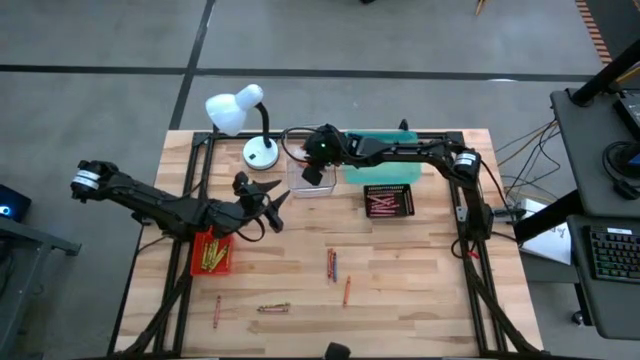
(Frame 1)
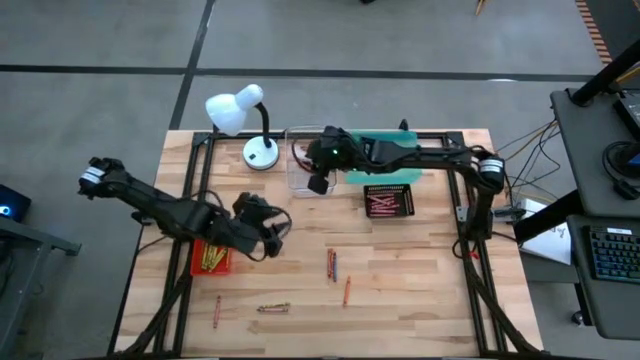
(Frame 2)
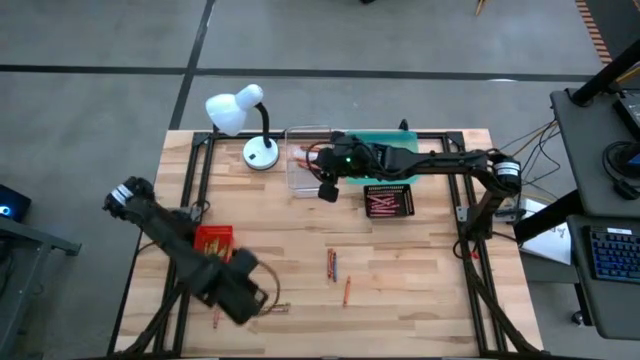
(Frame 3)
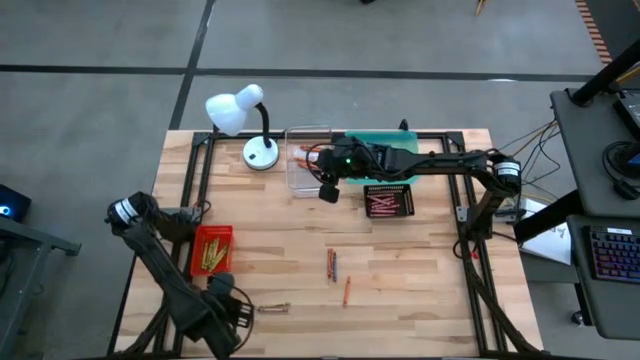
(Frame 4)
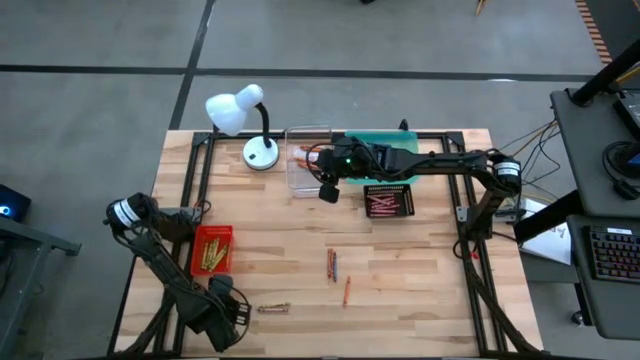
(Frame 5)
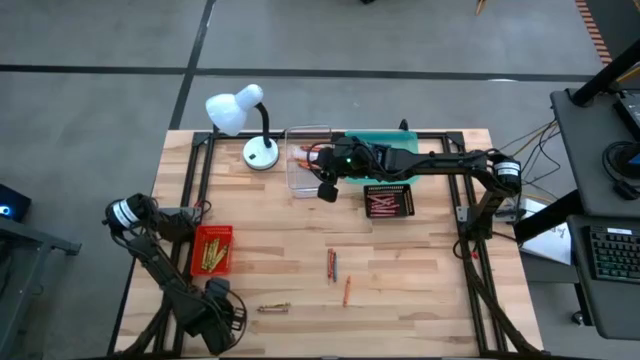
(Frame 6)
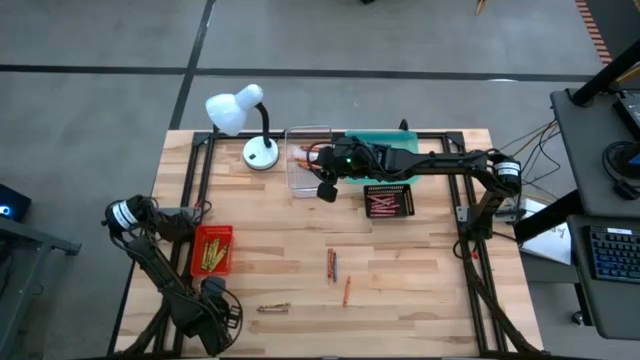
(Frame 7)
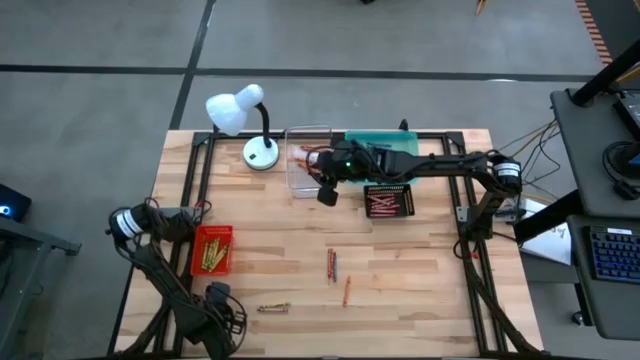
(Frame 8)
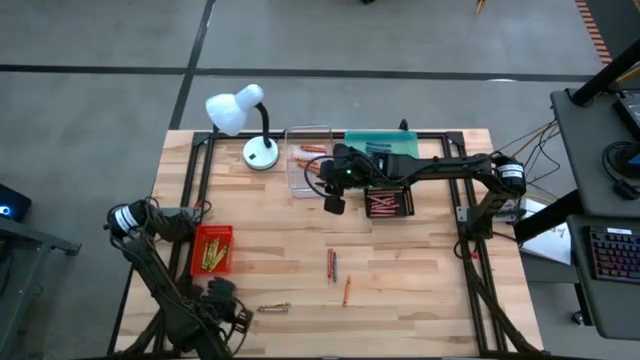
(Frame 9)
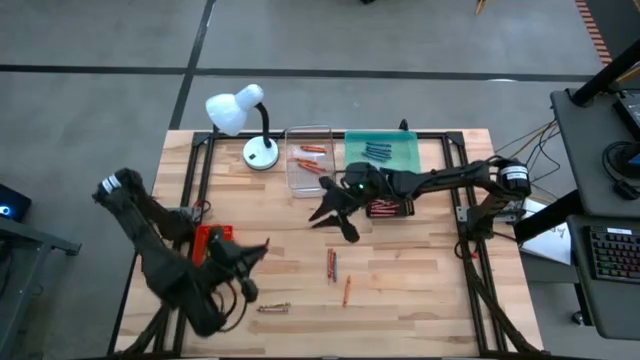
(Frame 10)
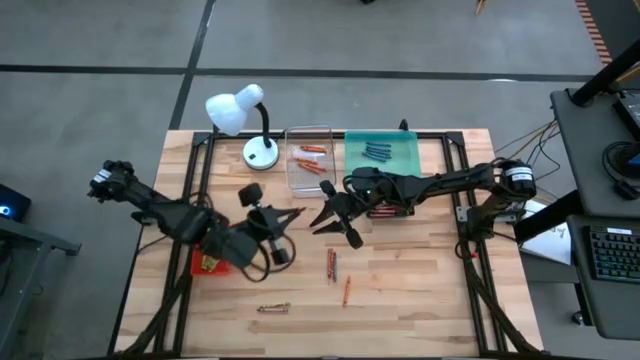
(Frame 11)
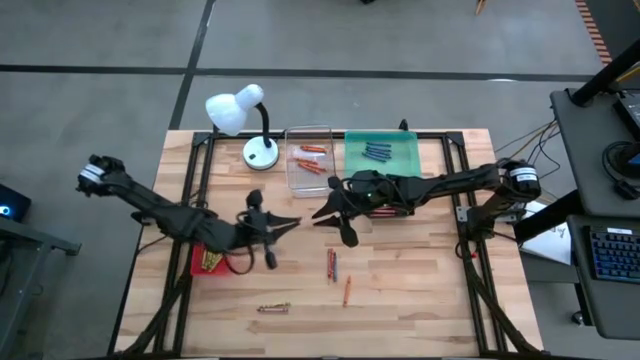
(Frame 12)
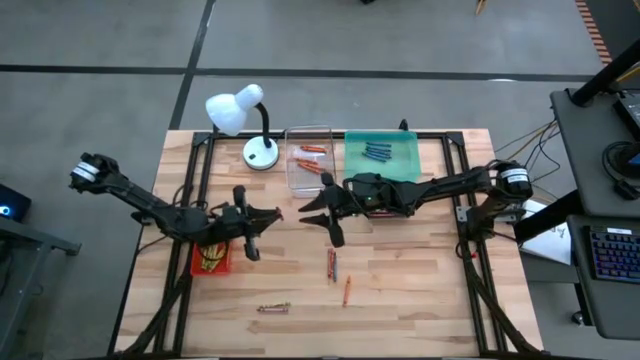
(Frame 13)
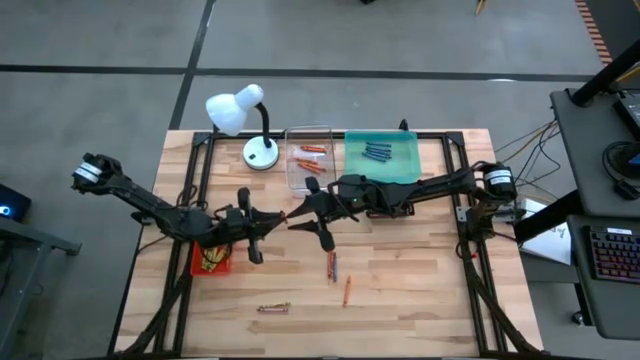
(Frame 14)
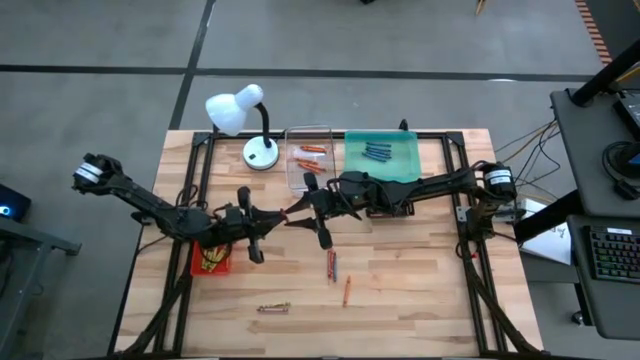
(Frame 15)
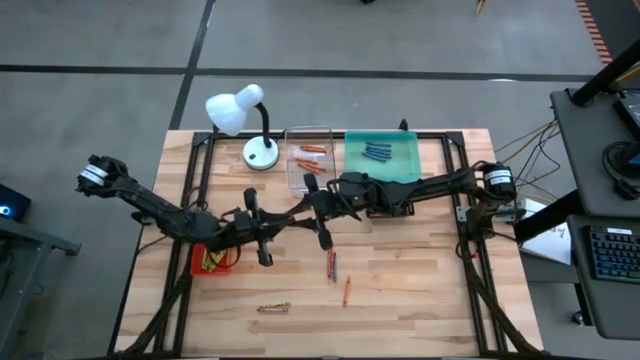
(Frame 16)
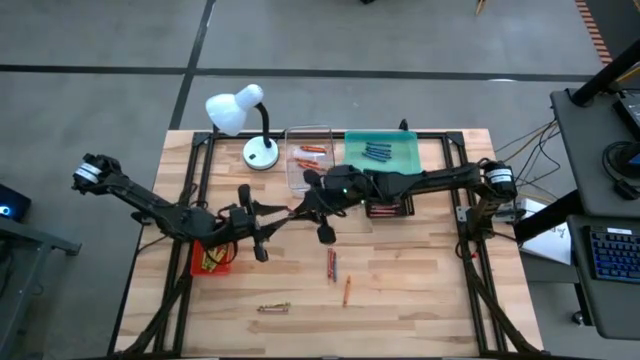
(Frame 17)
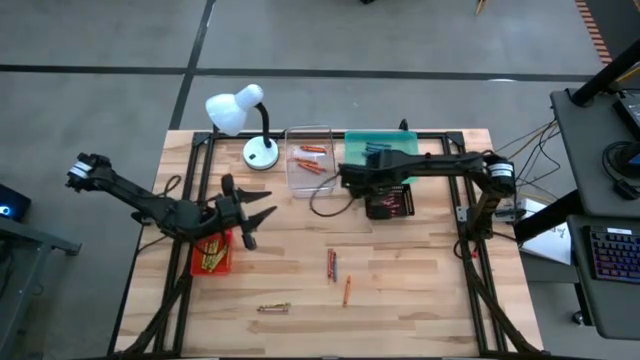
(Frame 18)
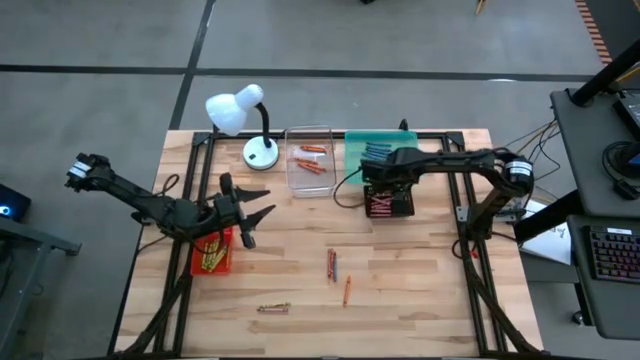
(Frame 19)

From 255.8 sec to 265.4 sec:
Task: Sort crayons
Put the red crayon into the black bin

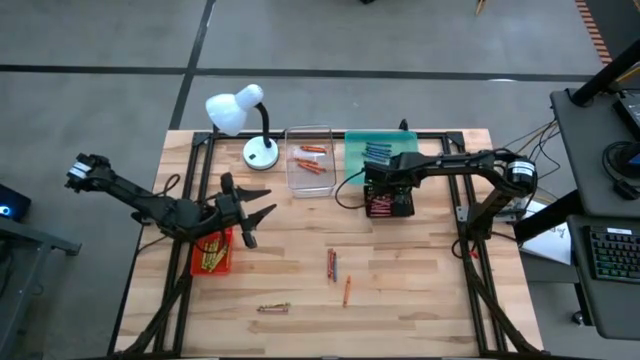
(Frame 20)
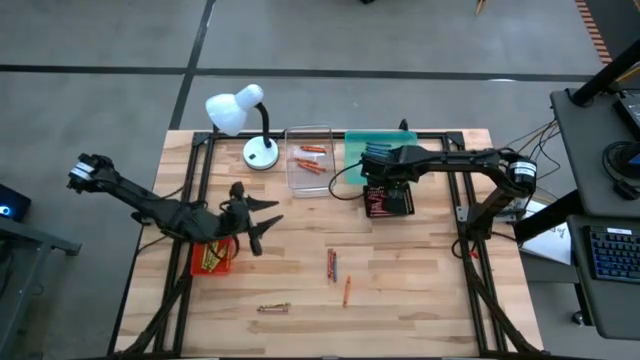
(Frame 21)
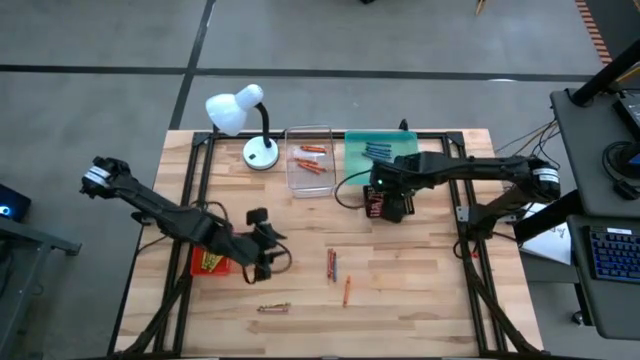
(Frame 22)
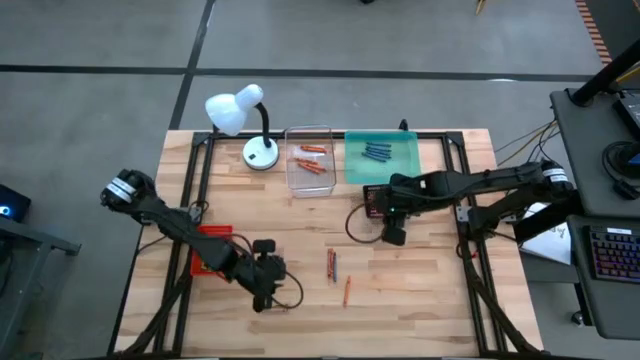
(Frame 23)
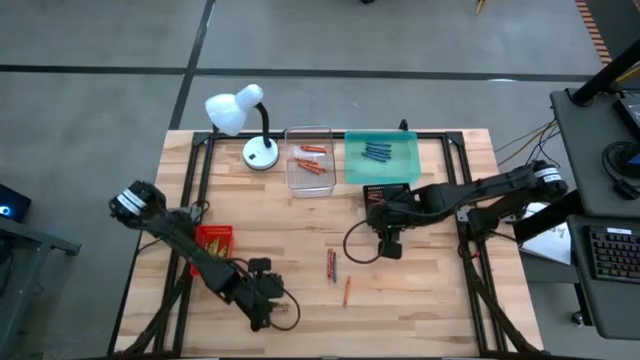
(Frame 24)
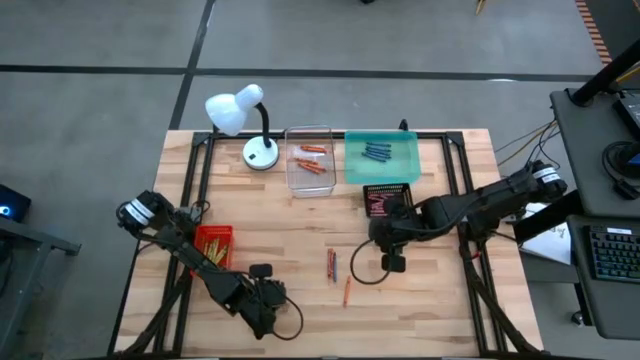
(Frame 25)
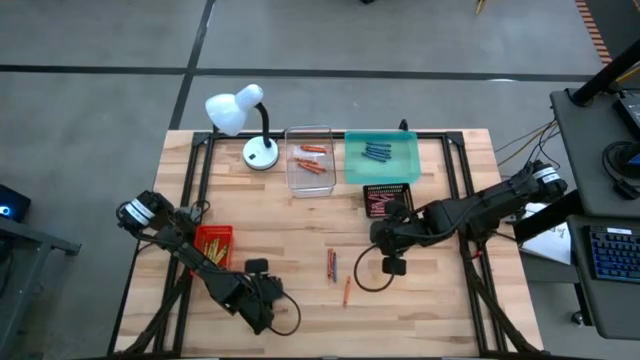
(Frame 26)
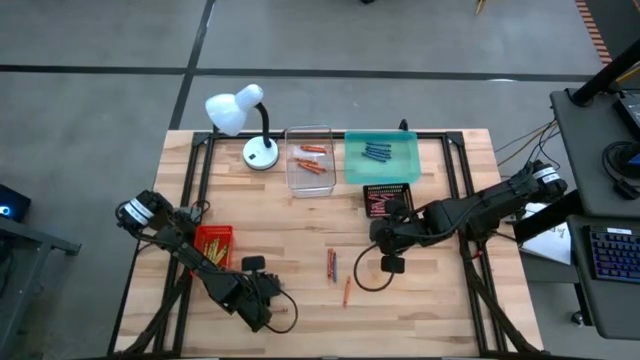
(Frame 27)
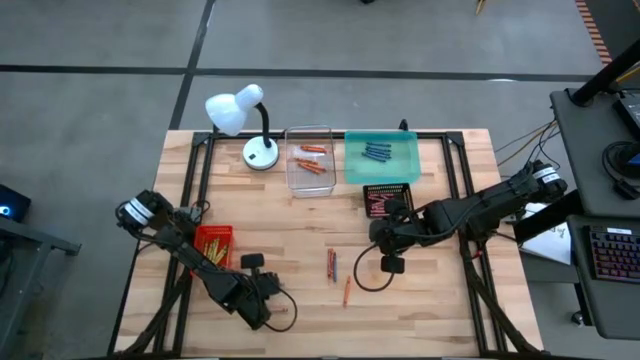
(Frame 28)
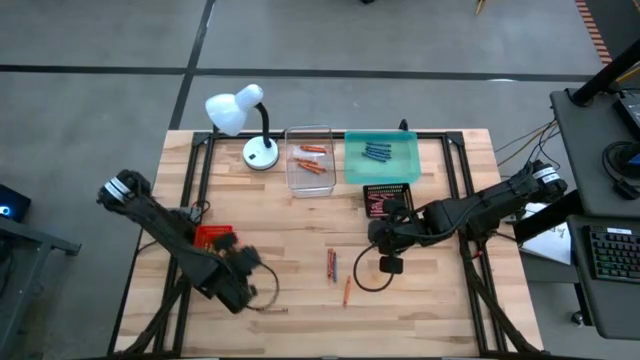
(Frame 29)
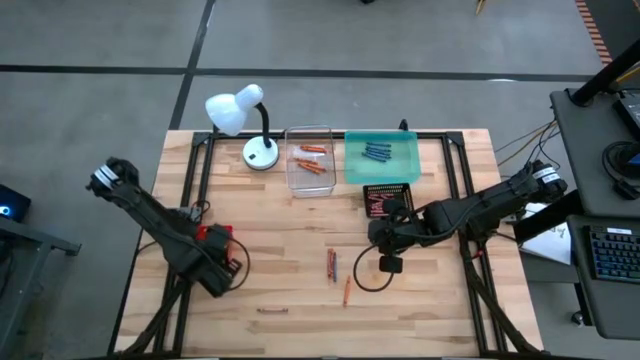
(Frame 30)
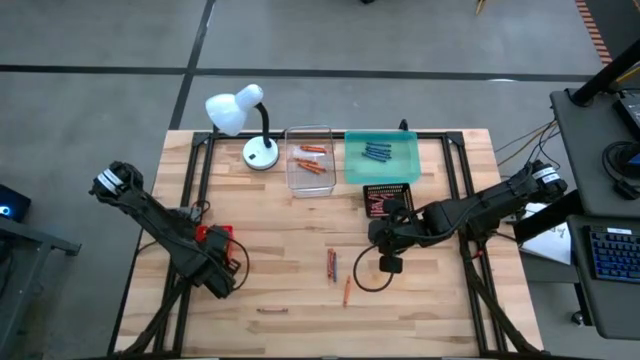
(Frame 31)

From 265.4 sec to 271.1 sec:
Put the green crayon into the orange bin

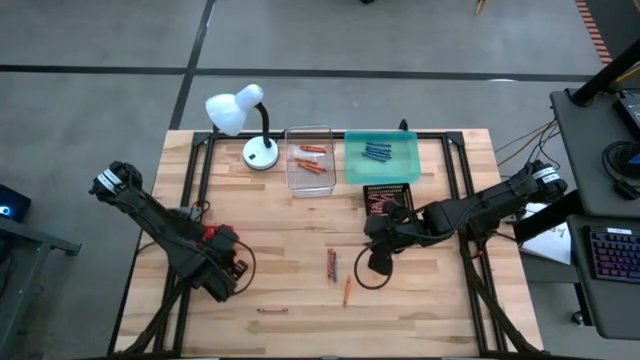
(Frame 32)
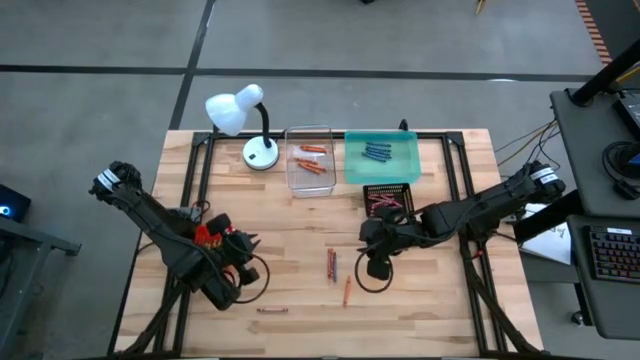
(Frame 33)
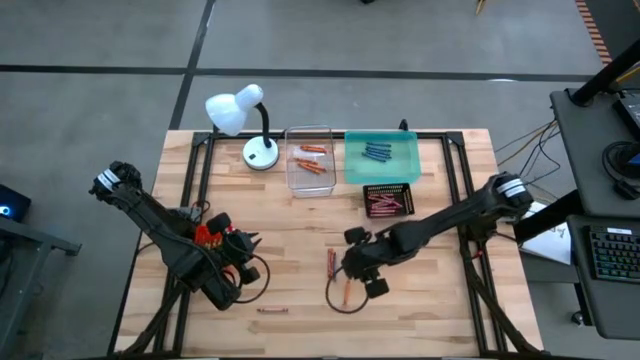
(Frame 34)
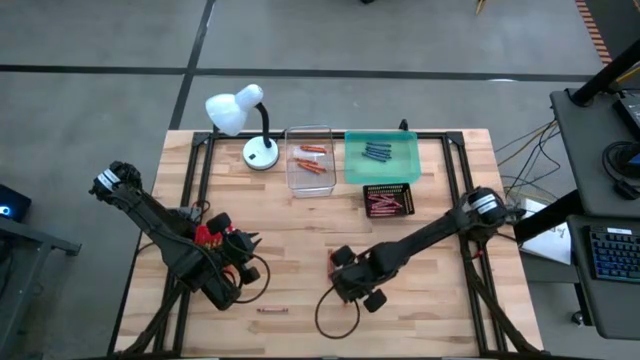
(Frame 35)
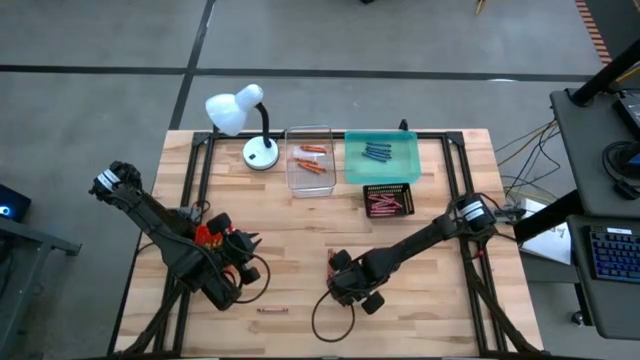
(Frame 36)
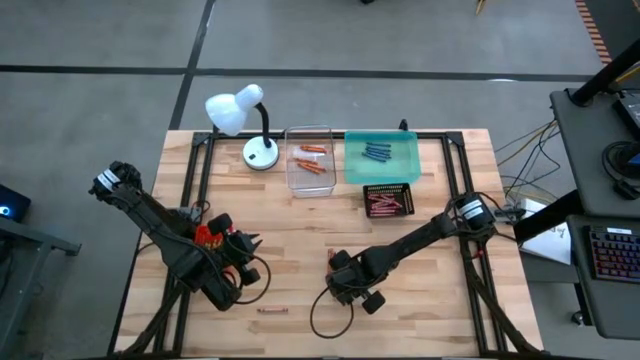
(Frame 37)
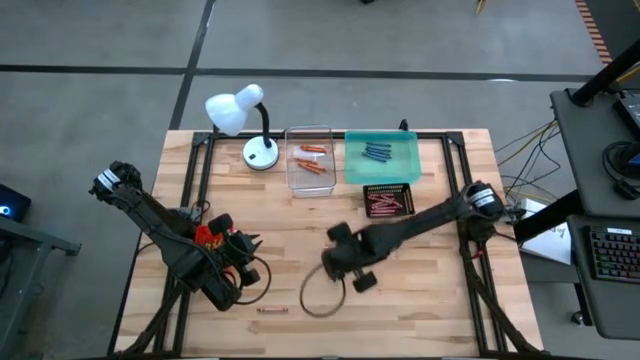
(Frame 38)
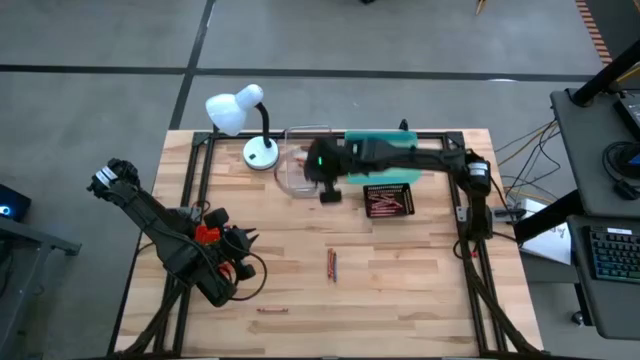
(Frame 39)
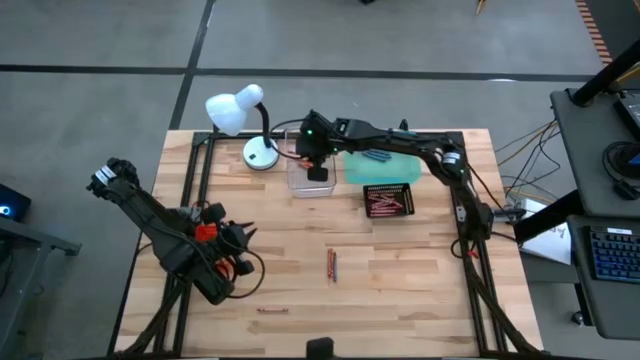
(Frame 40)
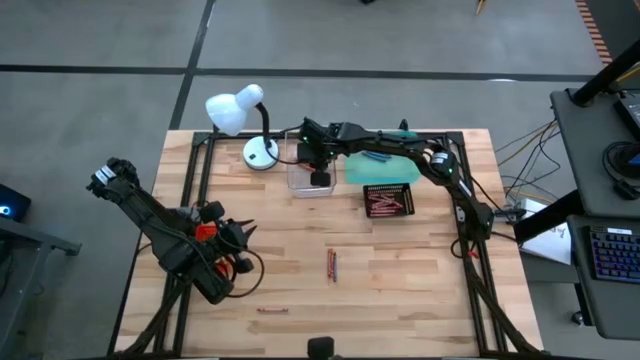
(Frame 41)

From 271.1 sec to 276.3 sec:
Put the orange crayon into the transparent bin

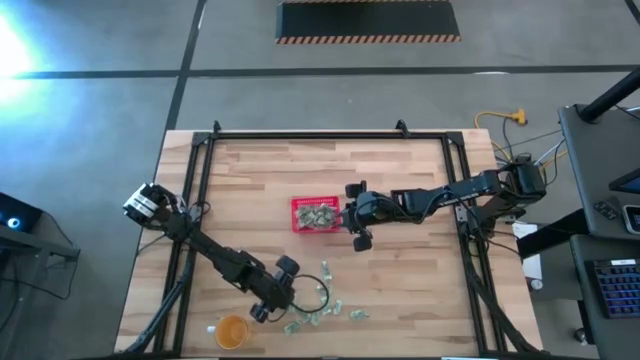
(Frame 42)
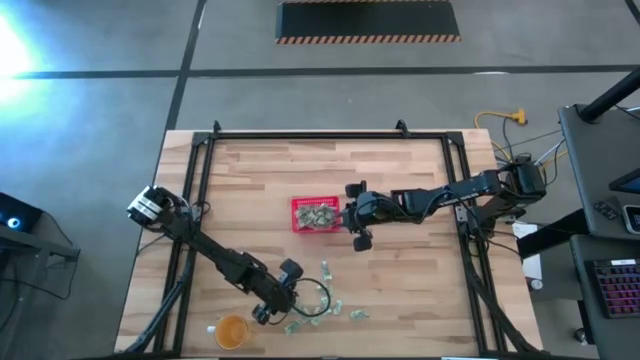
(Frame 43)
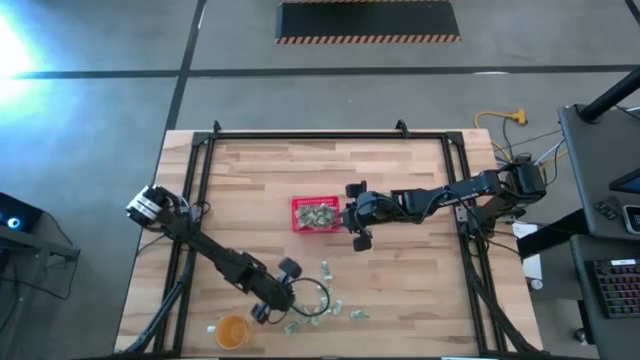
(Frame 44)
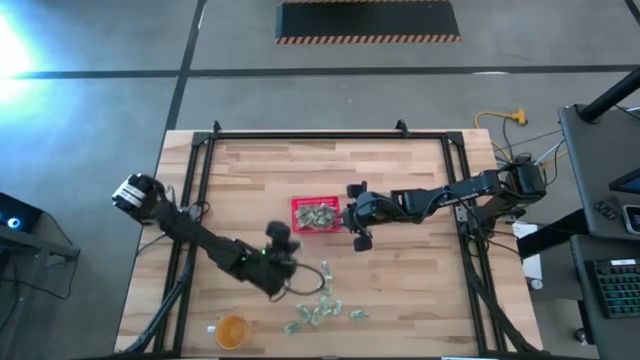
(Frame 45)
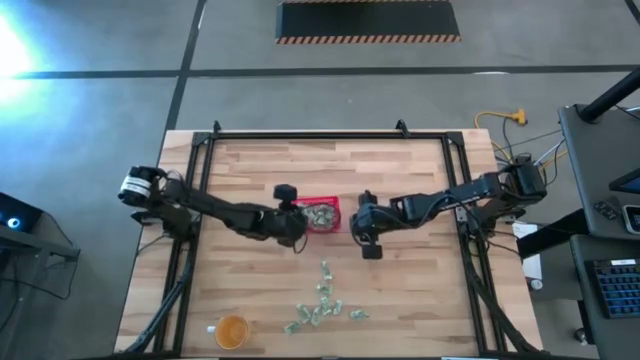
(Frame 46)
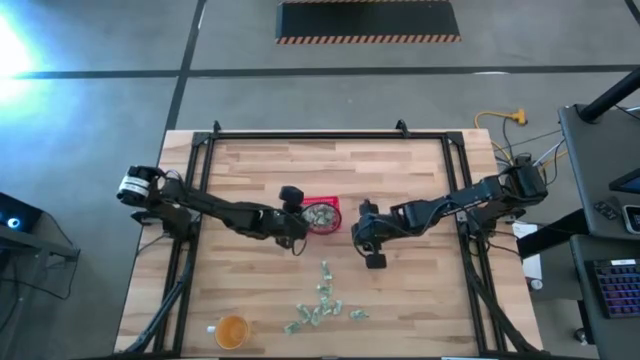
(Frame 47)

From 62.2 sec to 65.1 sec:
Task: Pick and place items into bin
Put the stevia packet into the red bin
